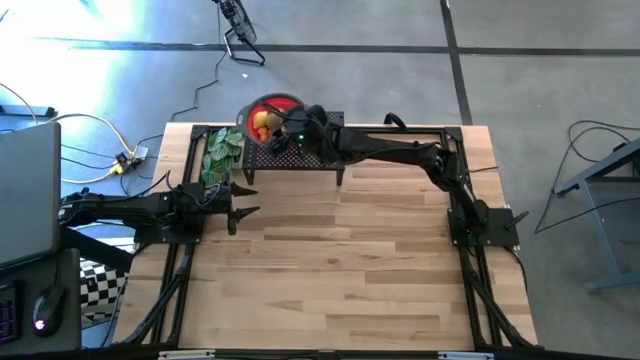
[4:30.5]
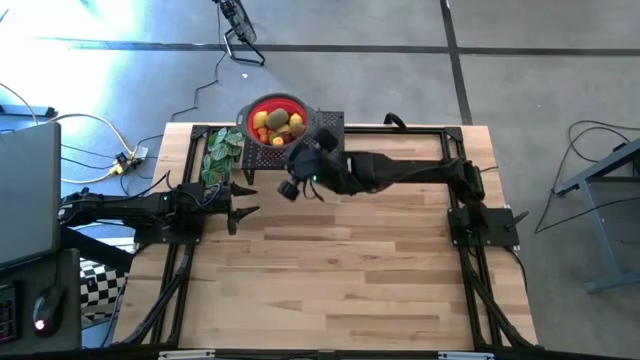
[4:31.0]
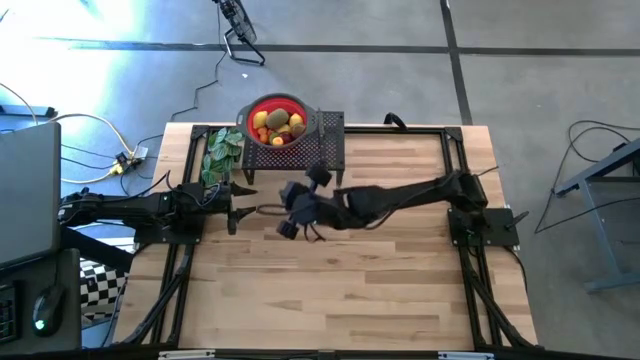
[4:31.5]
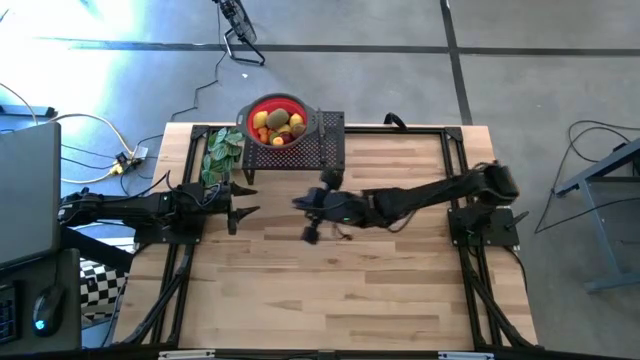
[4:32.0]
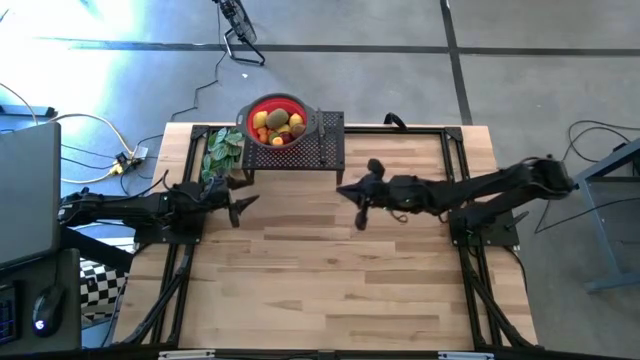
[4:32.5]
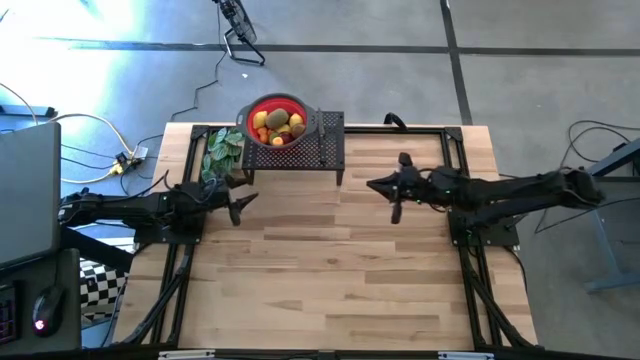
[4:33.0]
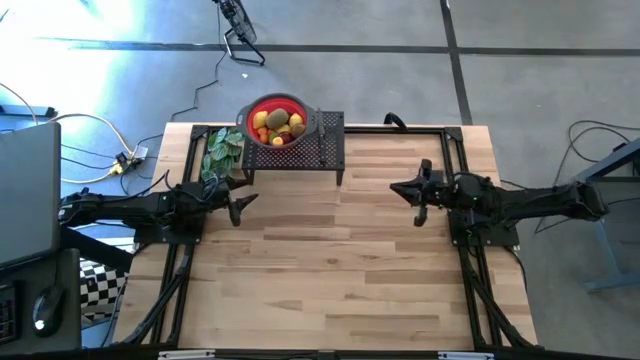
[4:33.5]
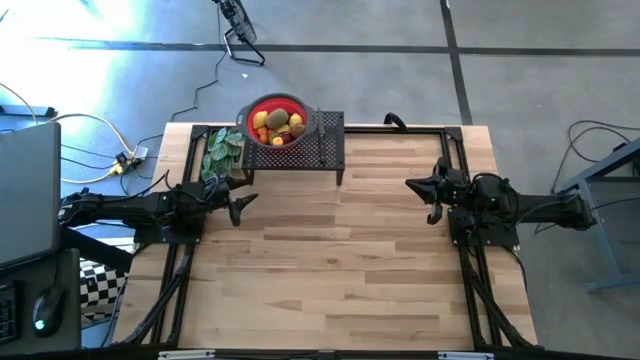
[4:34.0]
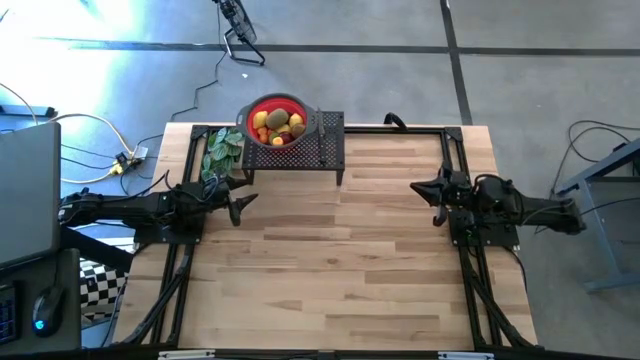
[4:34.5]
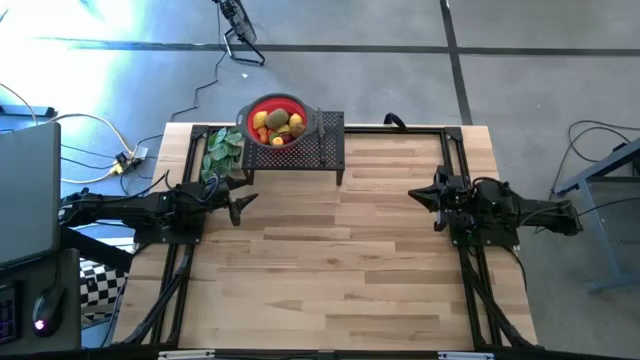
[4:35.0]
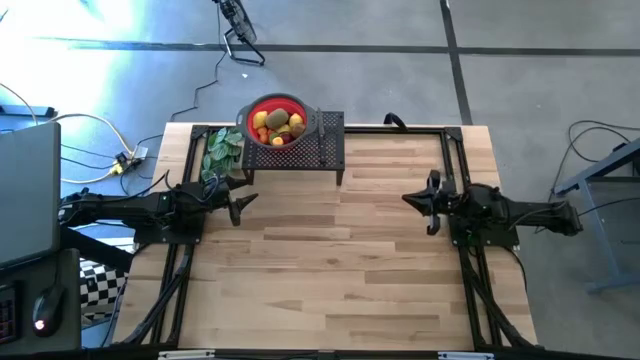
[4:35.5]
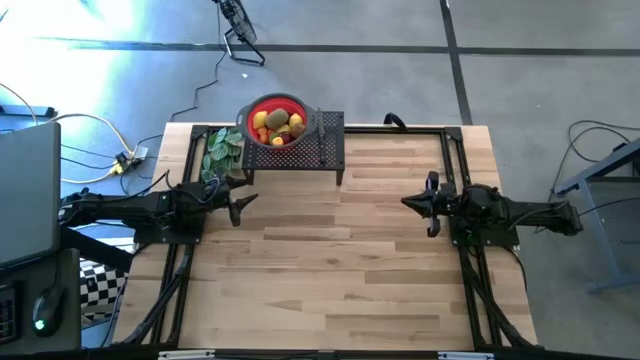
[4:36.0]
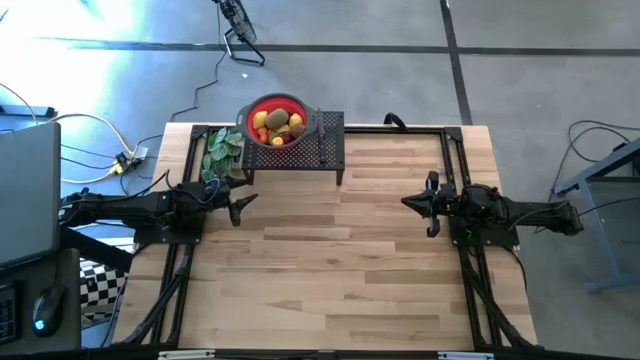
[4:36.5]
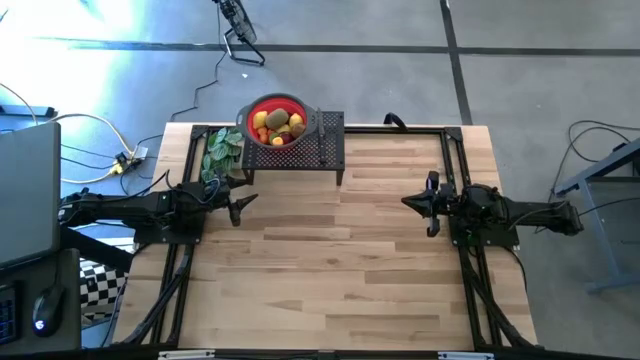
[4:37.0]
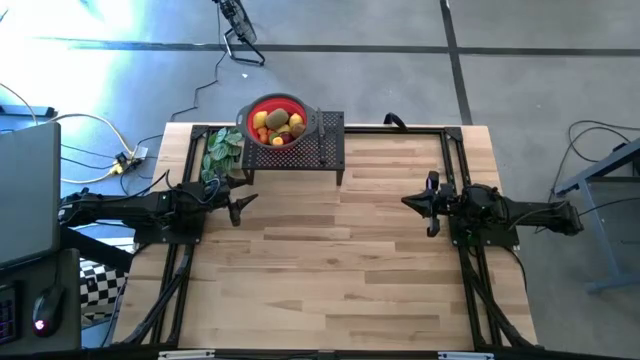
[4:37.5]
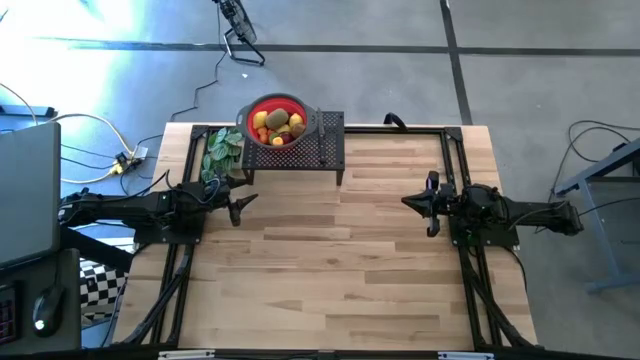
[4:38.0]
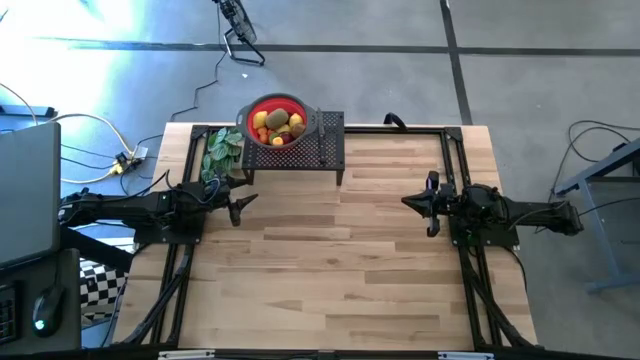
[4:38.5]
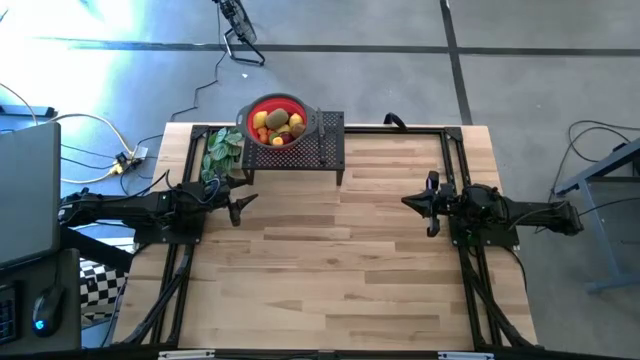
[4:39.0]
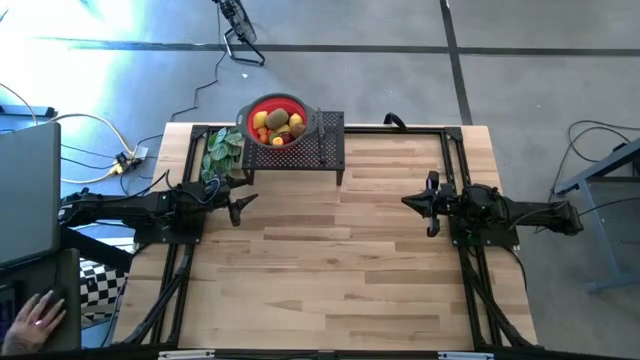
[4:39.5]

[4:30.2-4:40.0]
Task: Pick & Place Fruit
Return to Home Position

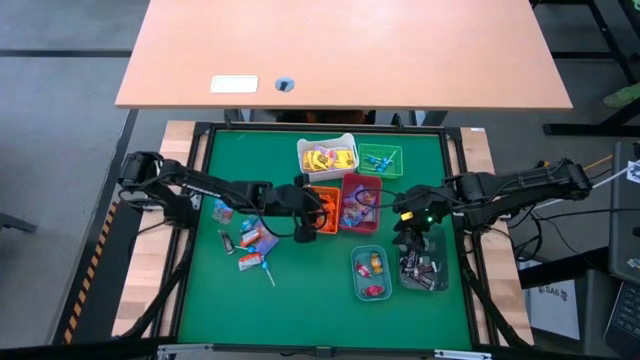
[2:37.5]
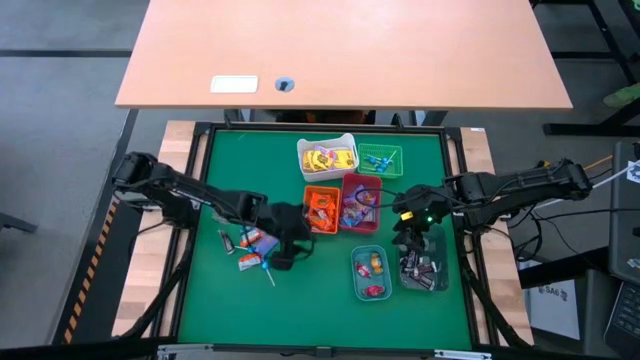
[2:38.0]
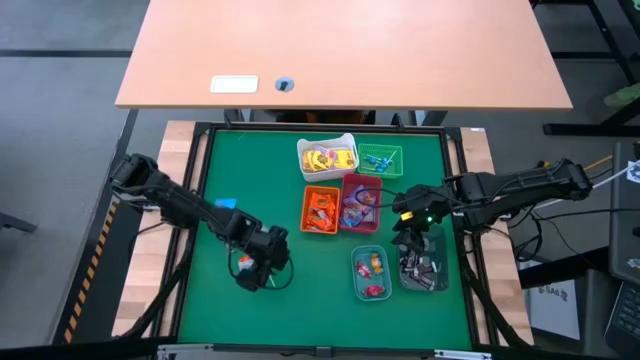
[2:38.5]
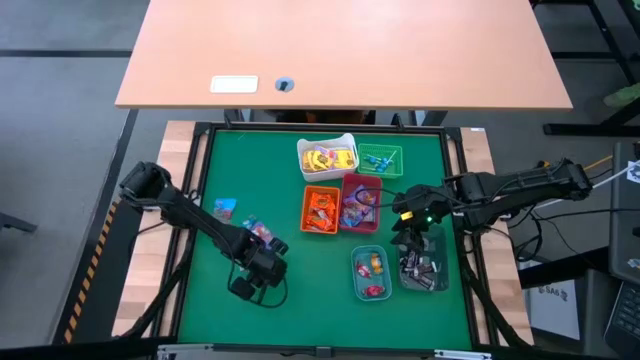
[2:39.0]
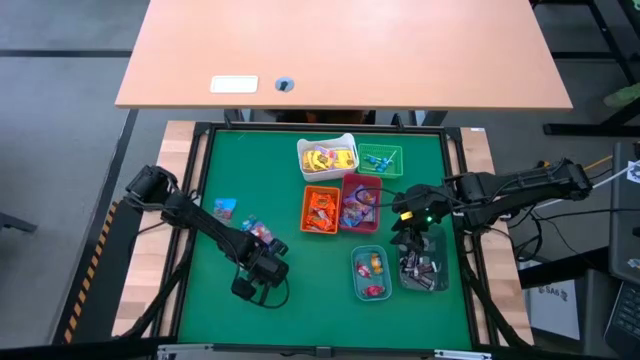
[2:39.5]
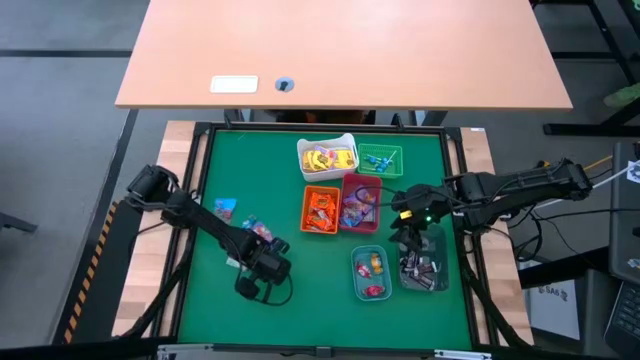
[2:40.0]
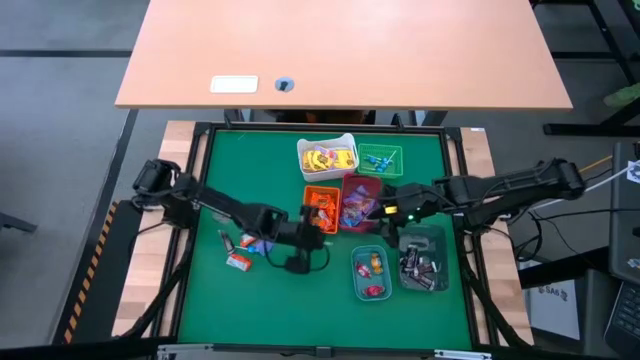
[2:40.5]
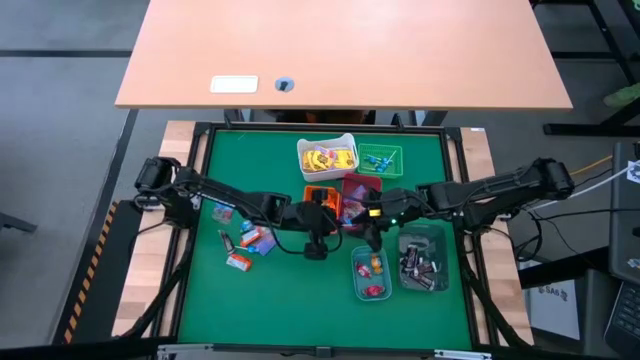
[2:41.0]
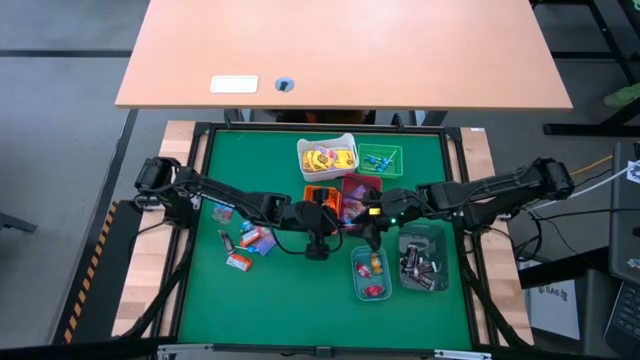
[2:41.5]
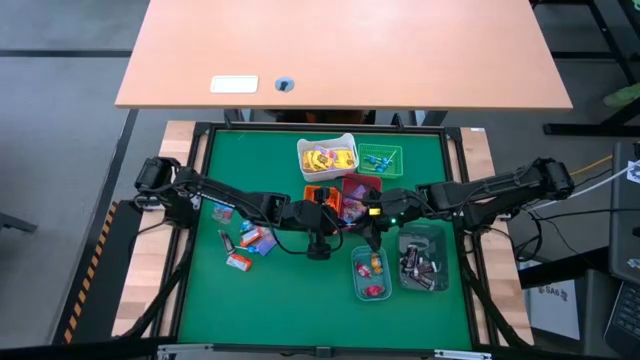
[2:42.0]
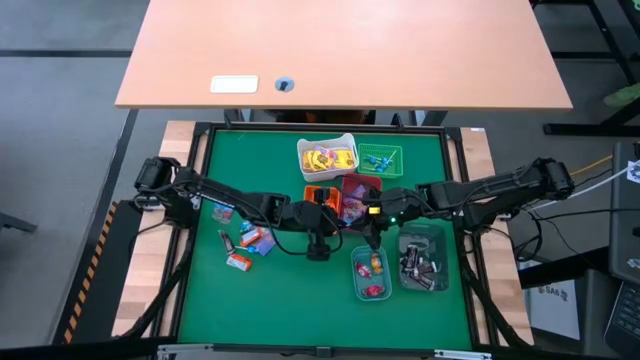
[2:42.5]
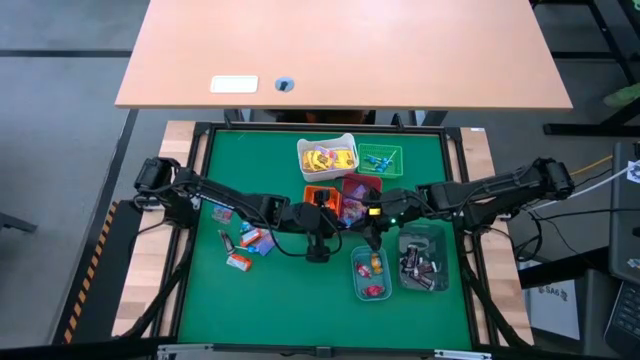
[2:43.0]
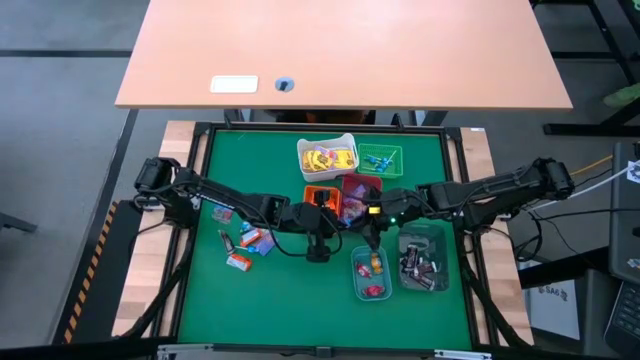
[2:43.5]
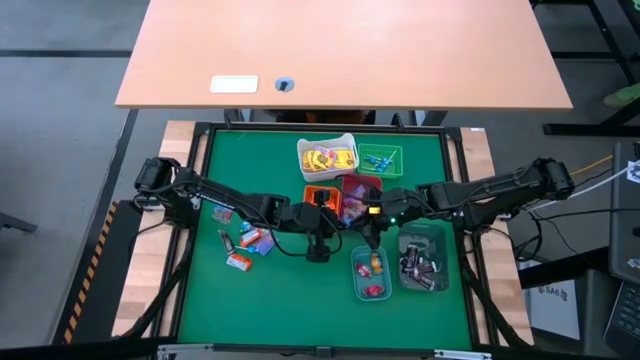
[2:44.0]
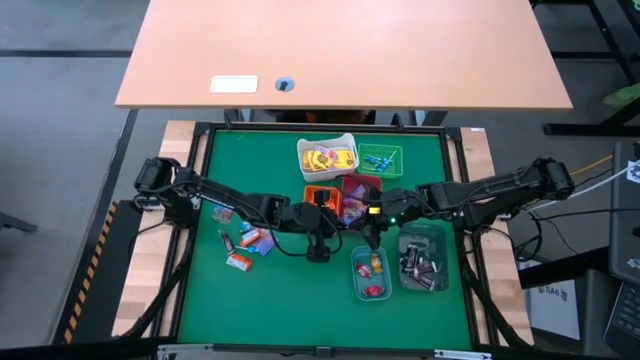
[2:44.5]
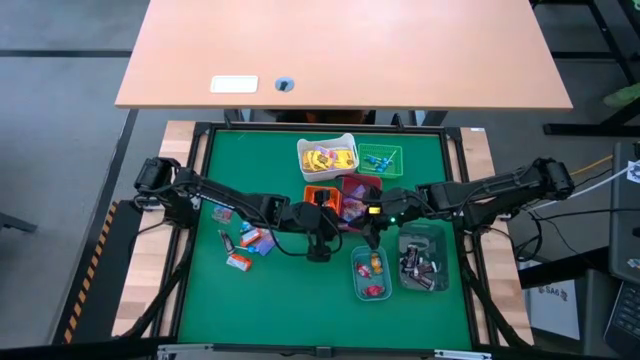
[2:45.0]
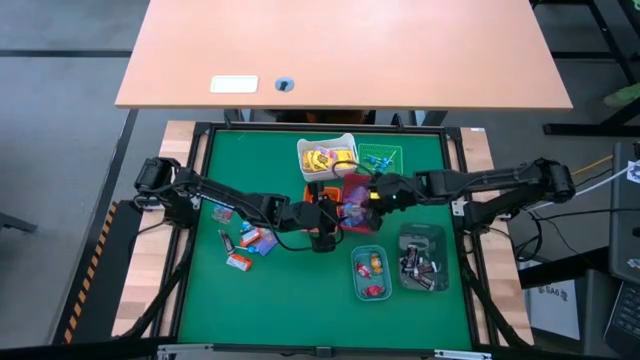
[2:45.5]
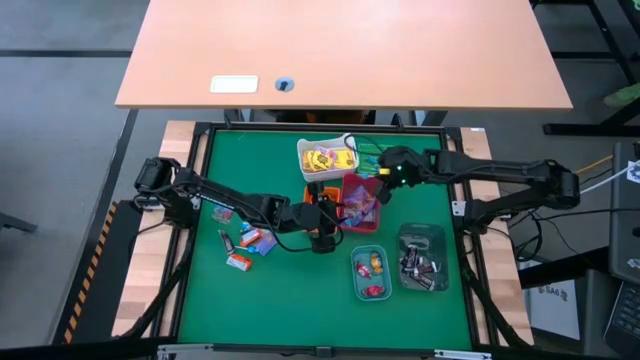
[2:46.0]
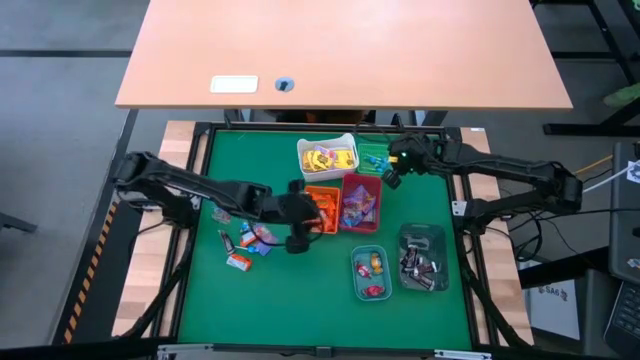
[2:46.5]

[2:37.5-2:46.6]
Task: Sort candy
Put the blue lollipop into the green basket

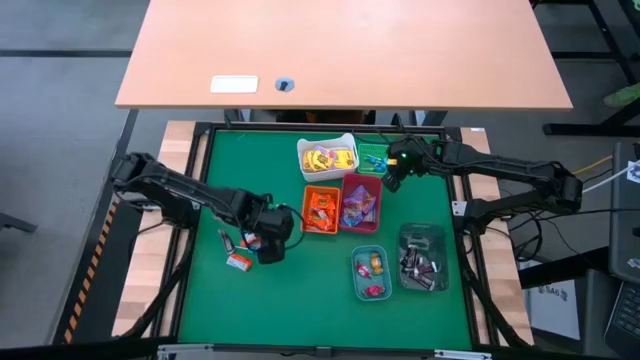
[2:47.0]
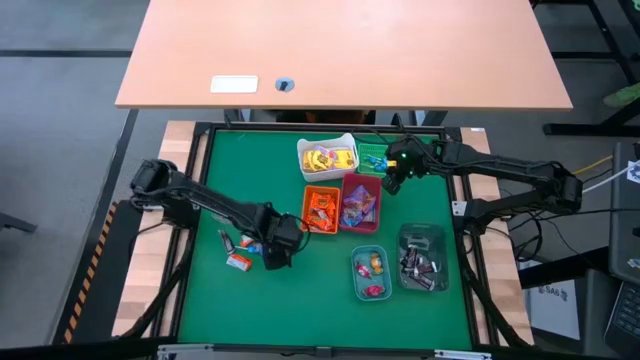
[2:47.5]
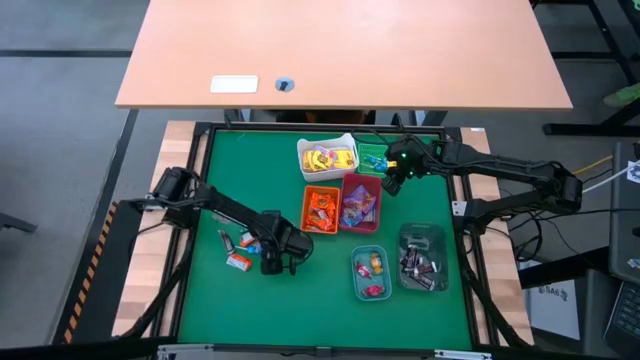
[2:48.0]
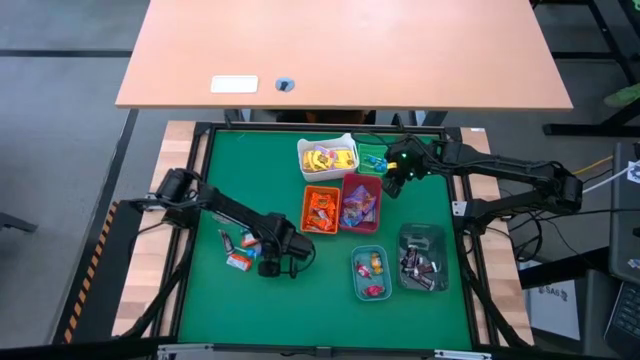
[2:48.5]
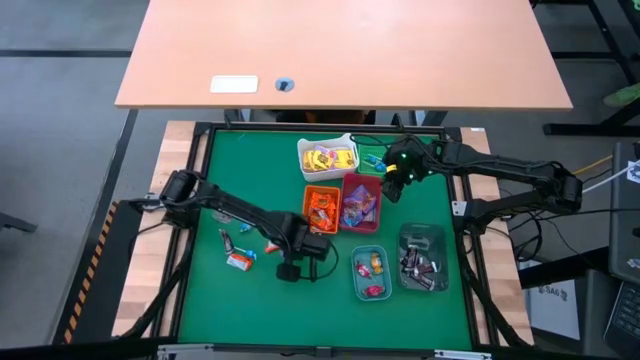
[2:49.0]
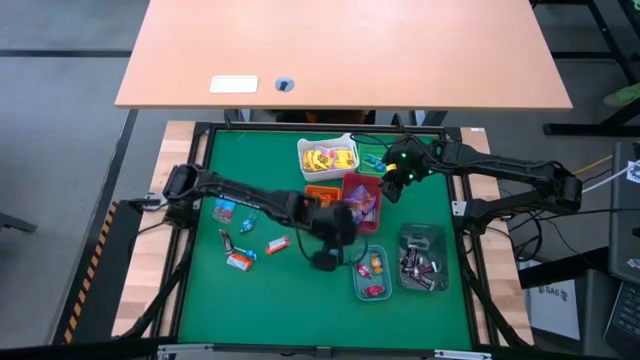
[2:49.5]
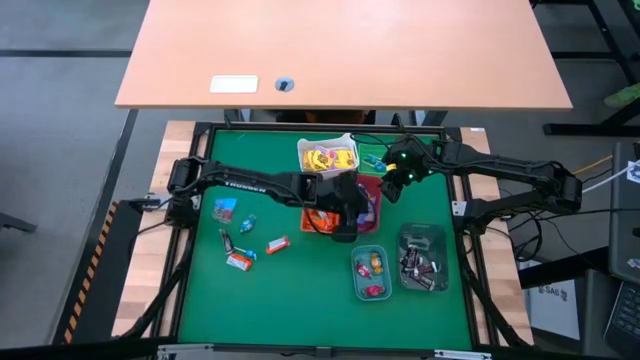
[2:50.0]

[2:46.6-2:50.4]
Put the purple bag of candy into the red bin
